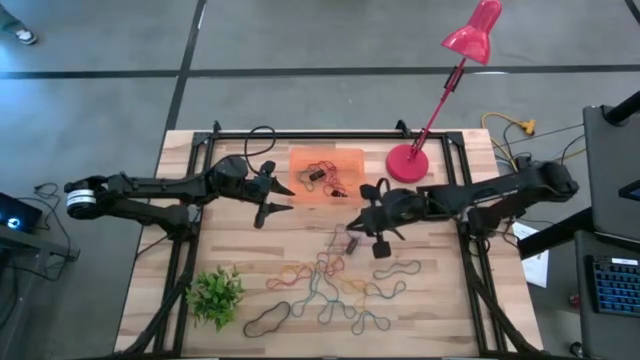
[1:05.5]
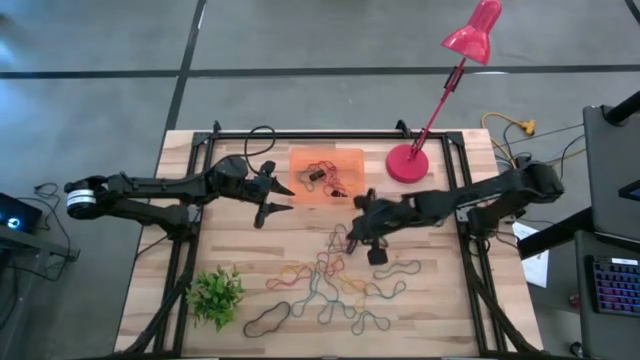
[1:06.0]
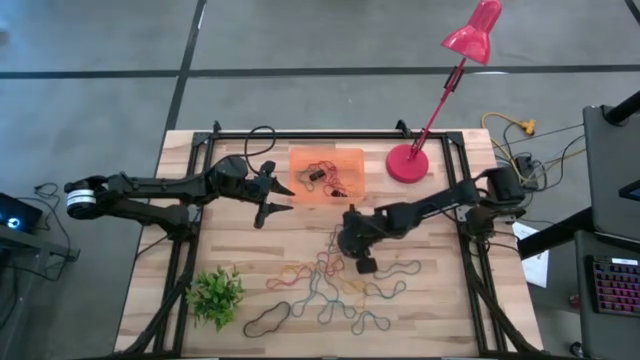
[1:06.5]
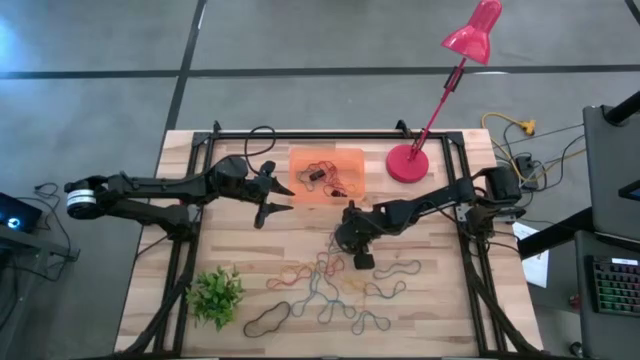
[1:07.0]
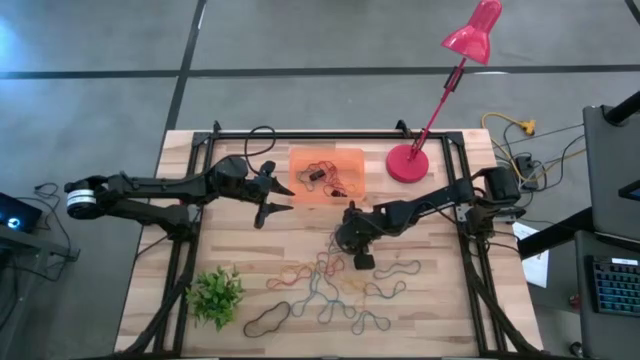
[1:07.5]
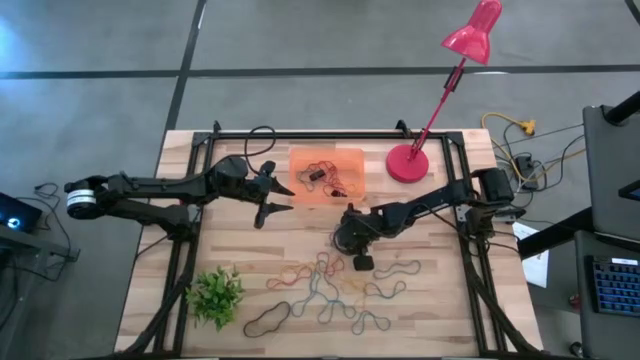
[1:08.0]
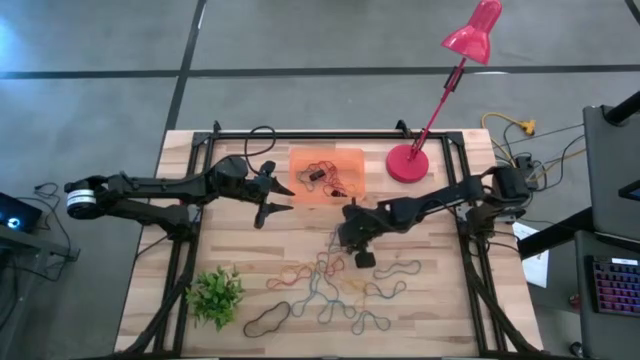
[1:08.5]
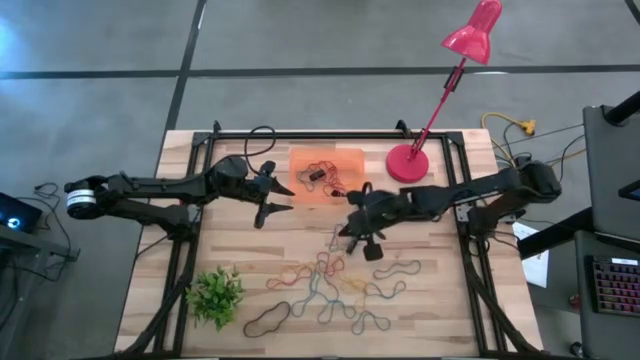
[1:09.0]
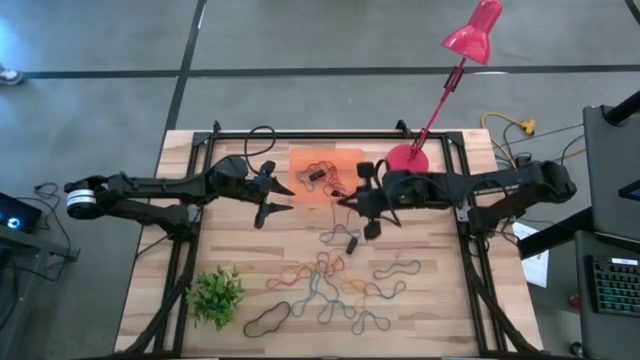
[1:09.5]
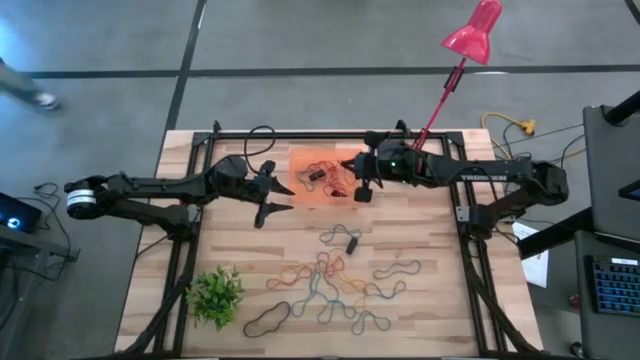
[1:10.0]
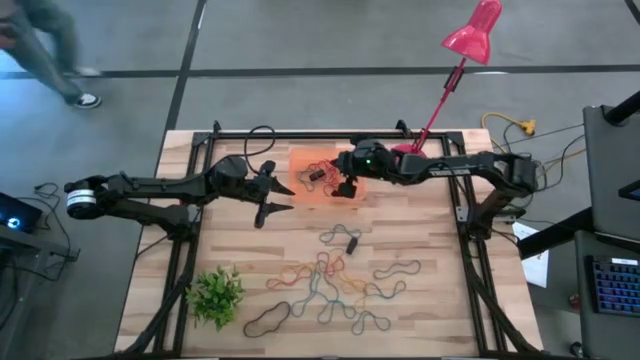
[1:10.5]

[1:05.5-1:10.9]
Task: Pick and place rubber bands into bin
Put the red rubber band into the orange bin

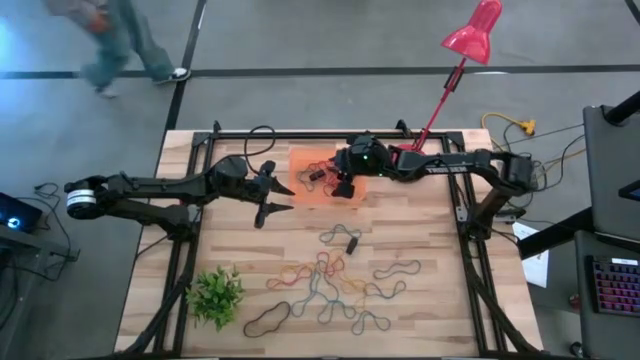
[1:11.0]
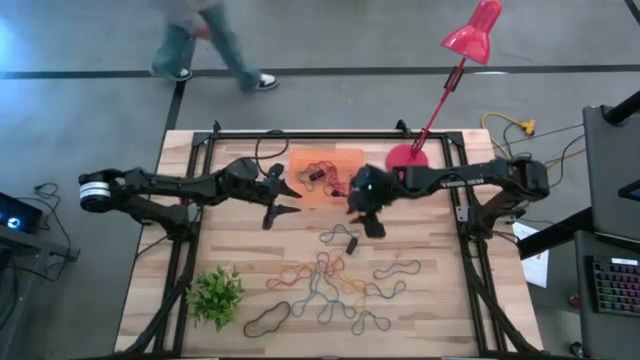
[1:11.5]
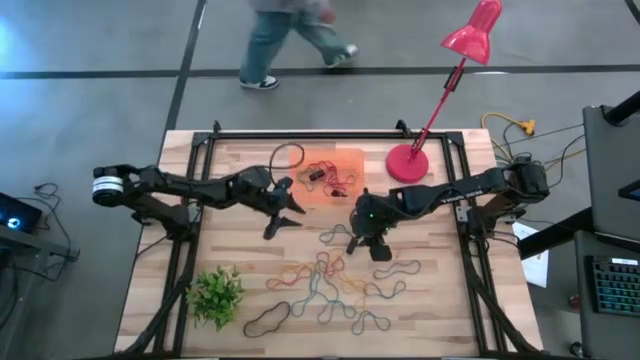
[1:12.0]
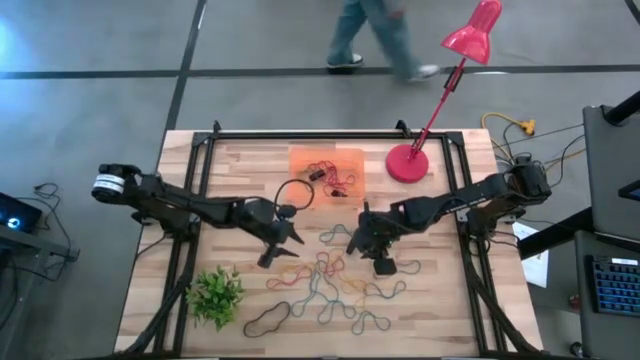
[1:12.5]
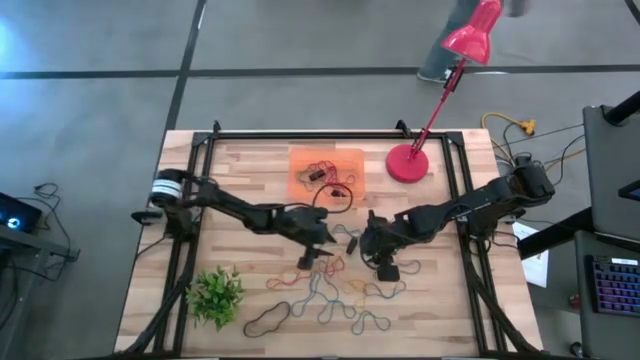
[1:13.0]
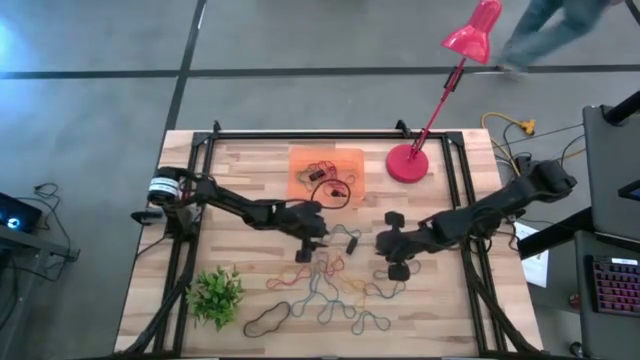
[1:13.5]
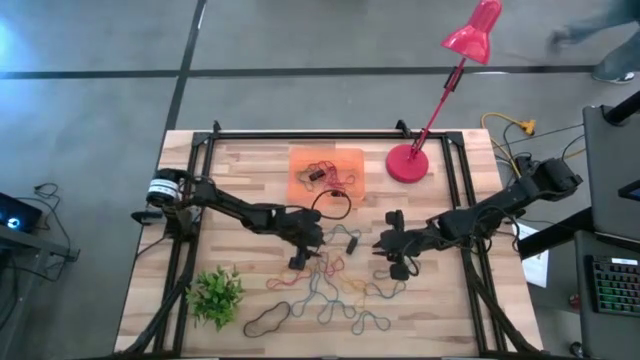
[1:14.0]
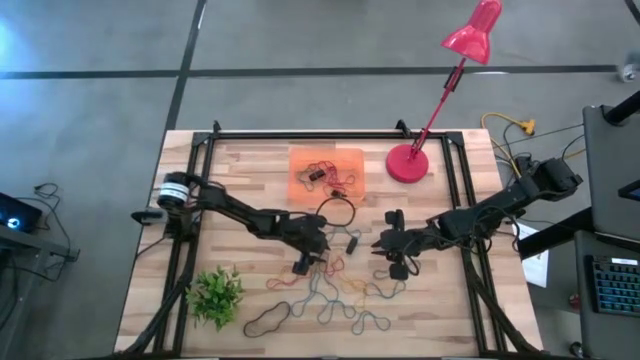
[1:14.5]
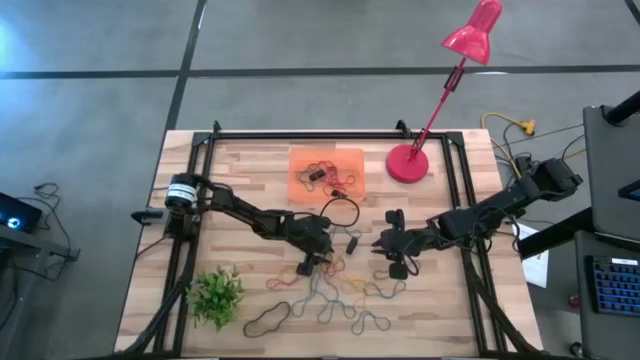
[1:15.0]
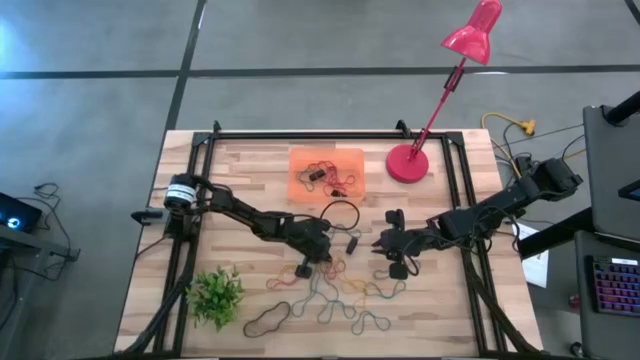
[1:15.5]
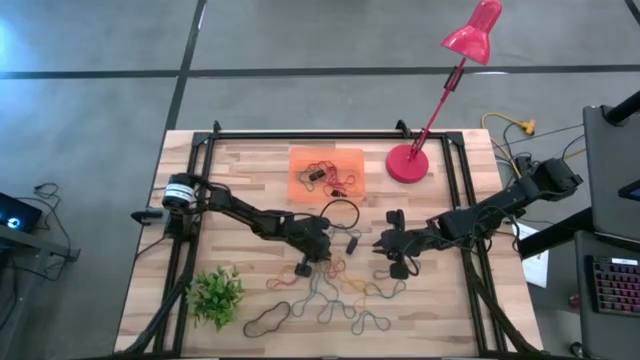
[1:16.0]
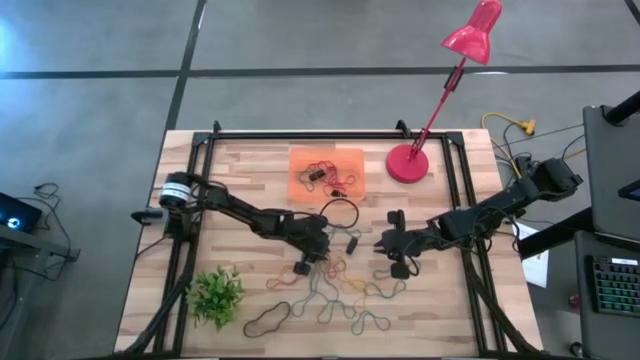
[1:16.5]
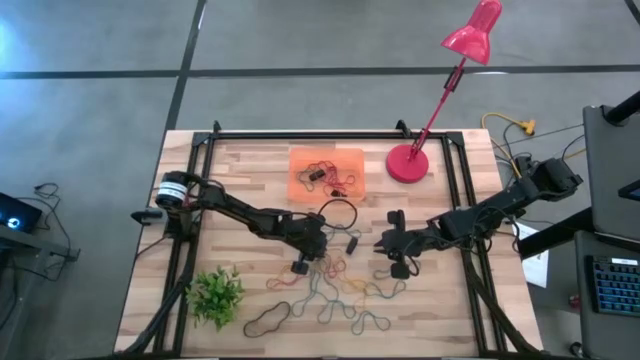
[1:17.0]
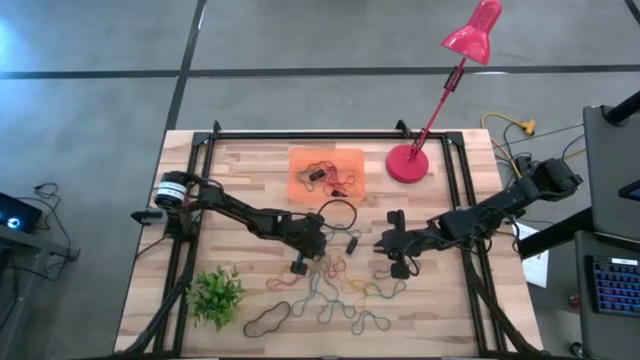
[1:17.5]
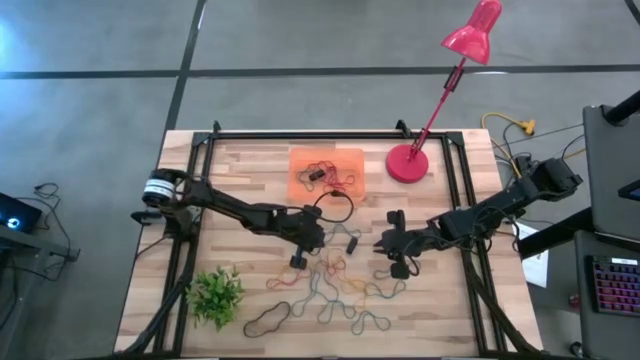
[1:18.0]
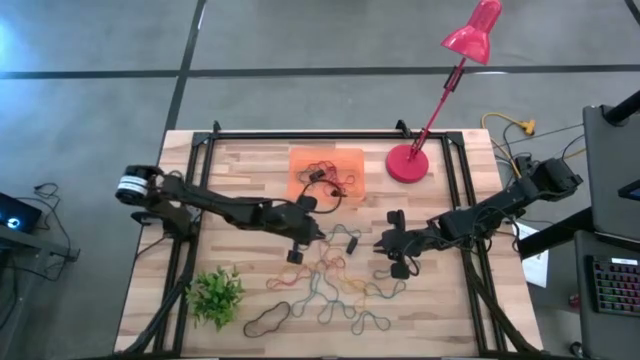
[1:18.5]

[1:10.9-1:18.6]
Put the red rubber band into the orange bin

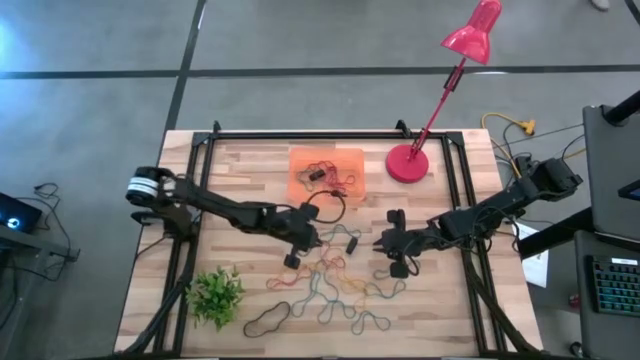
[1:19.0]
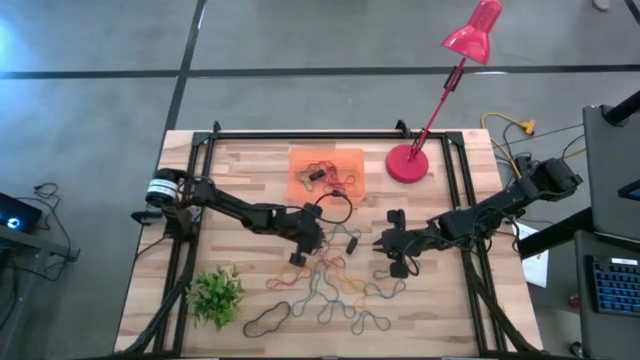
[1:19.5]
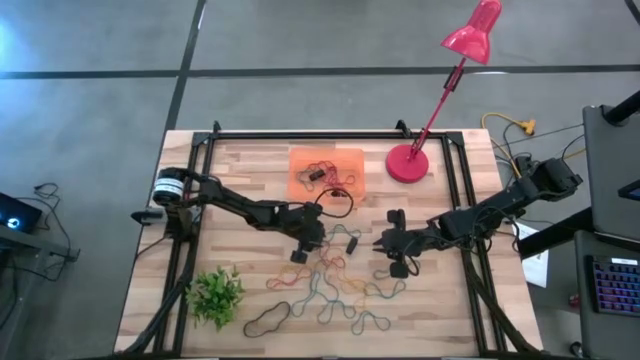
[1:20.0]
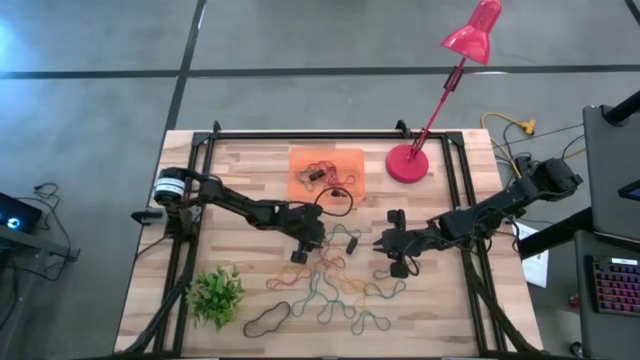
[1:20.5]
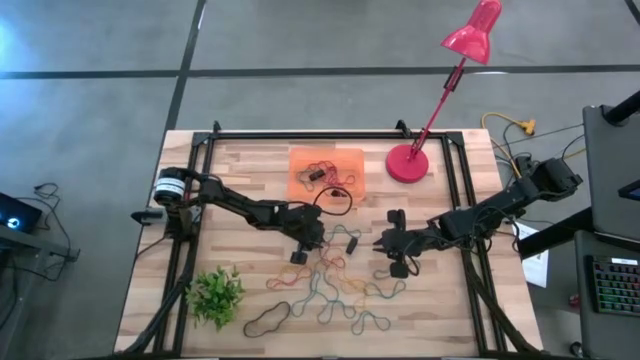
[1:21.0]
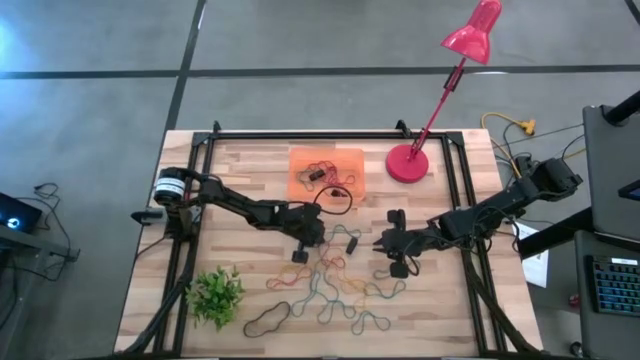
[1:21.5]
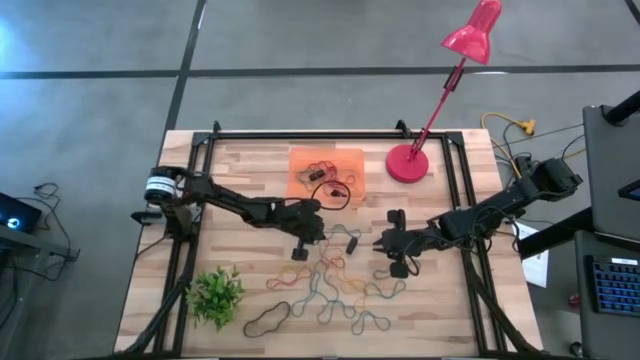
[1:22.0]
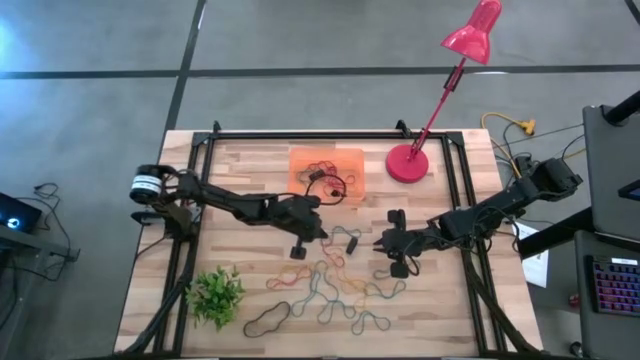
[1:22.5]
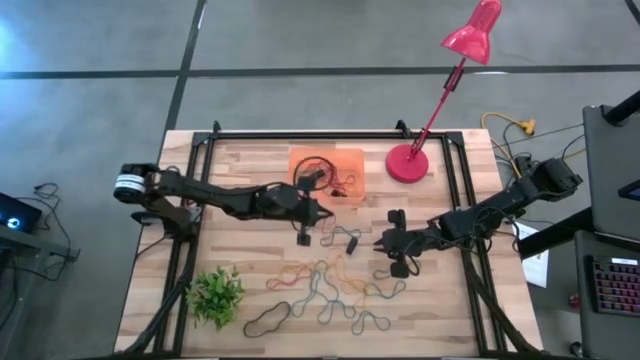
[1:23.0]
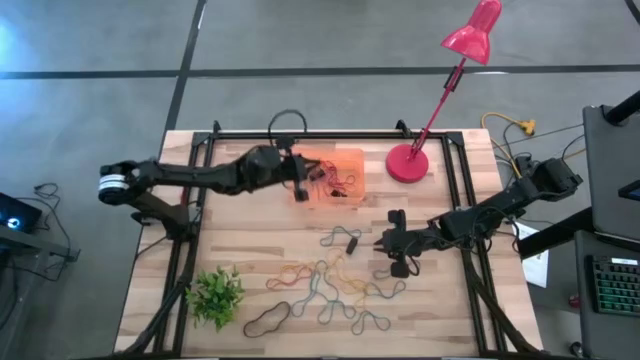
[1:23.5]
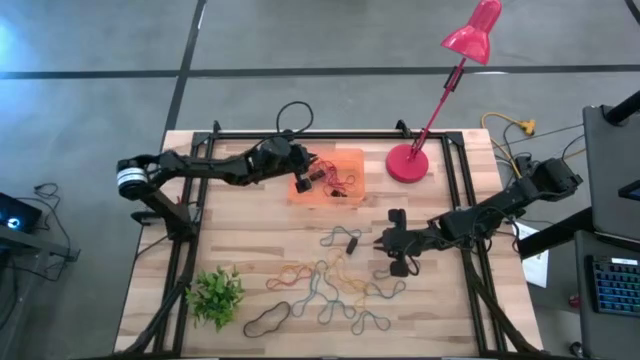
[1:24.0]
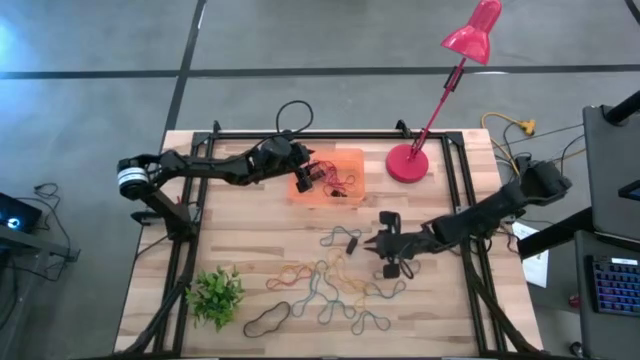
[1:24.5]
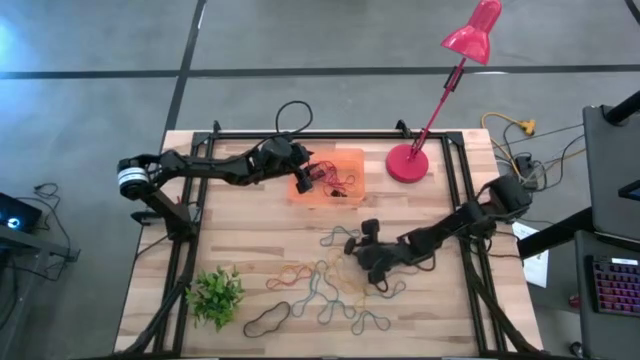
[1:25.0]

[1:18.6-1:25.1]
Put the red rubber band into the orange bin

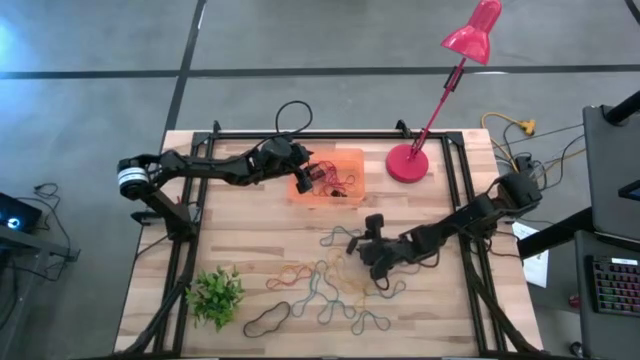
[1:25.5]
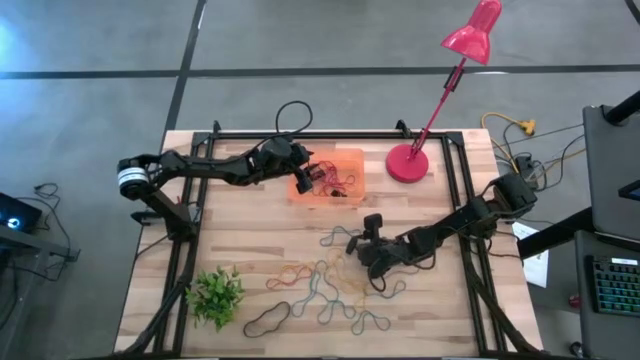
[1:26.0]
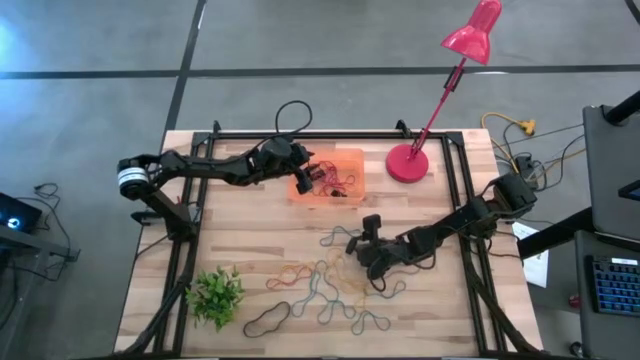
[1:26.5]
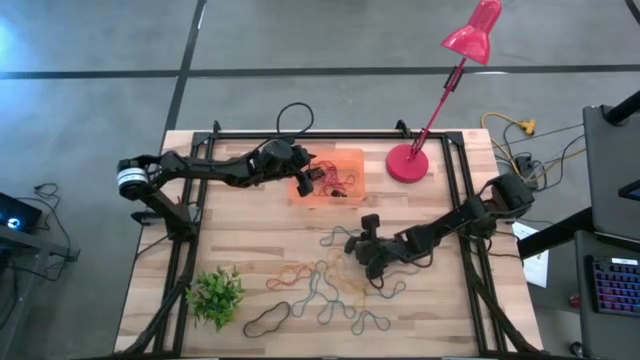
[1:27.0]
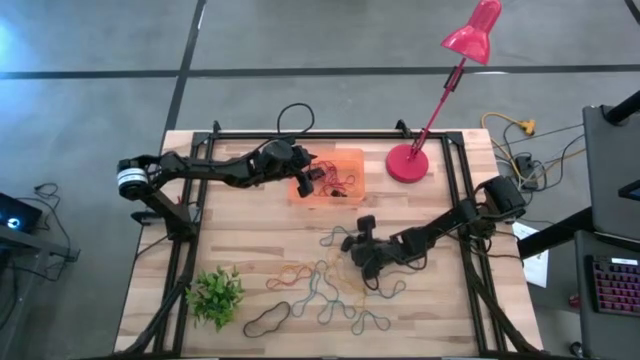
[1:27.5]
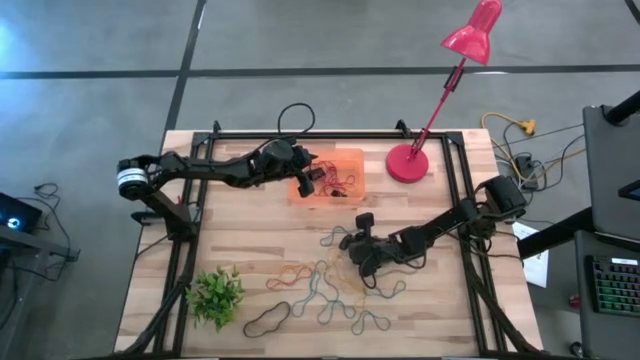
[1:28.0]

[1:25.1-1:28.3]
Put the black rubber band into the orange bin
